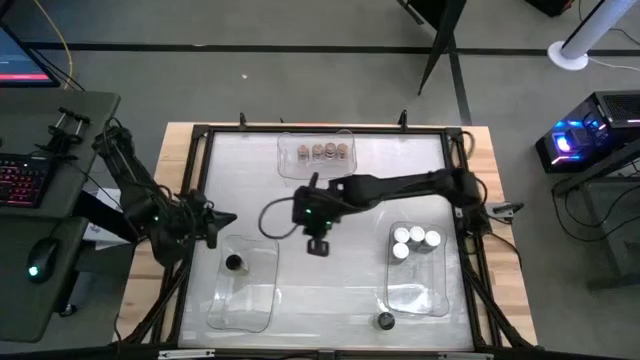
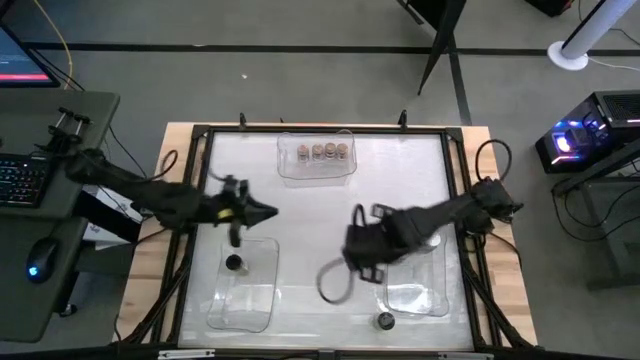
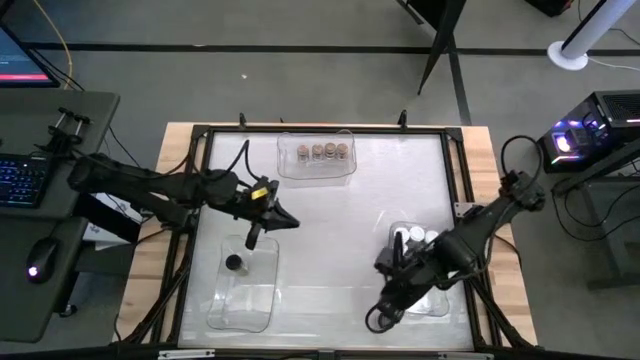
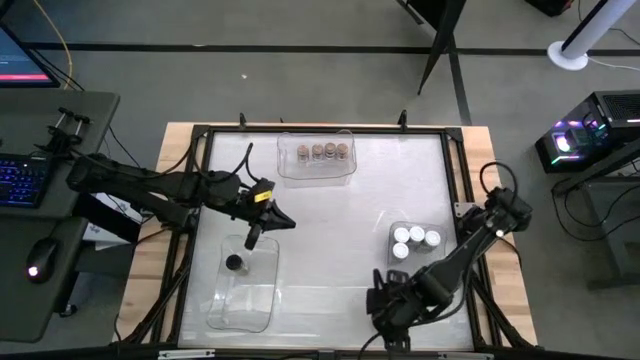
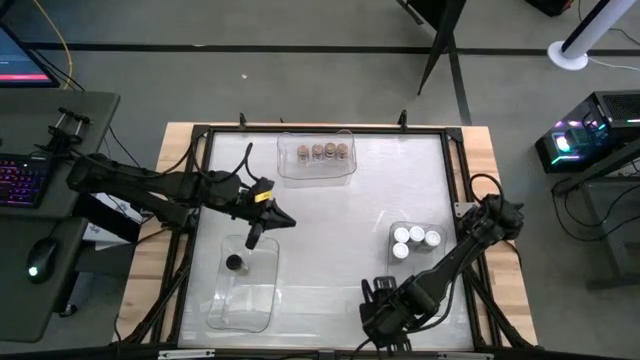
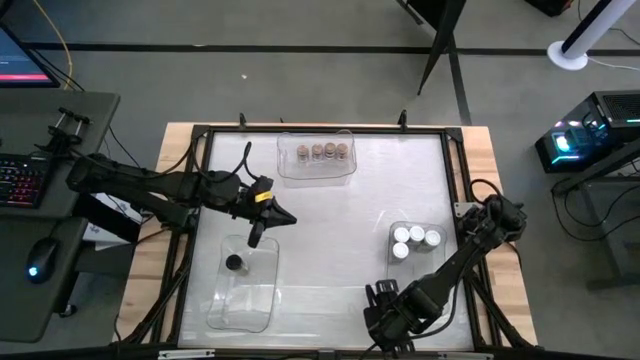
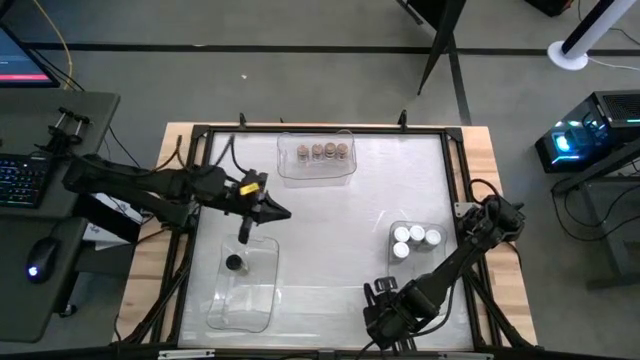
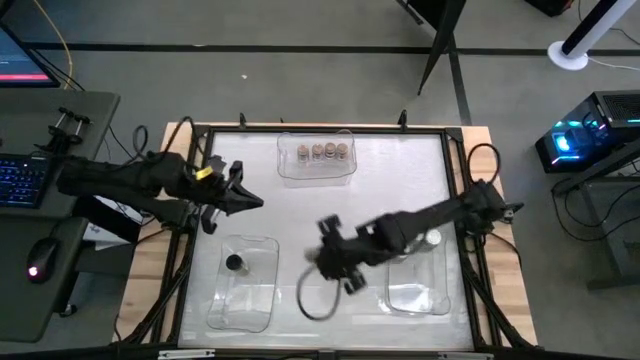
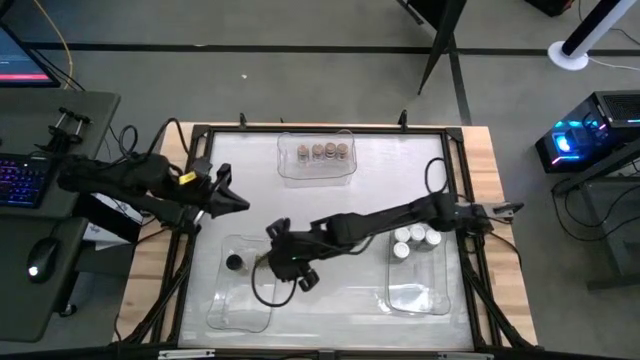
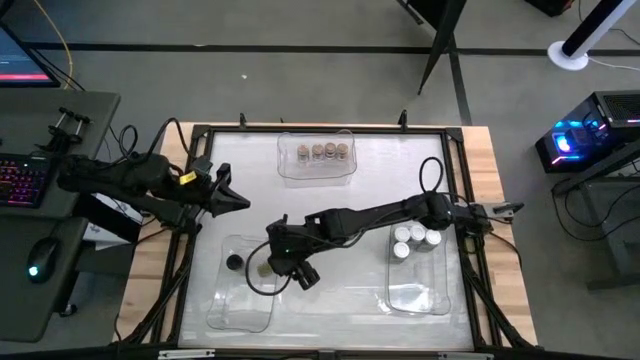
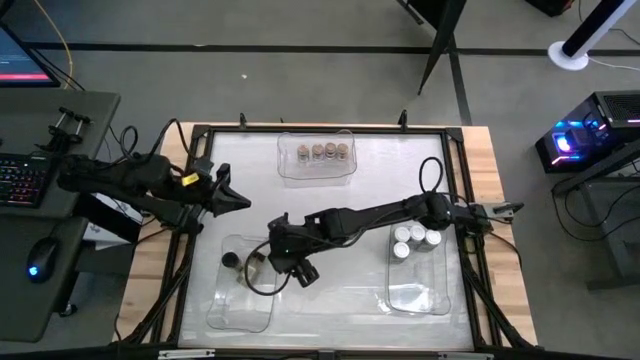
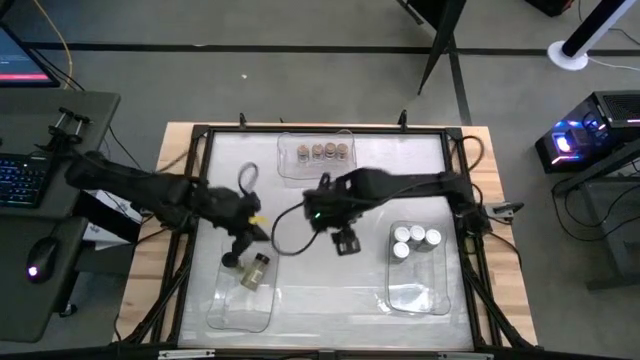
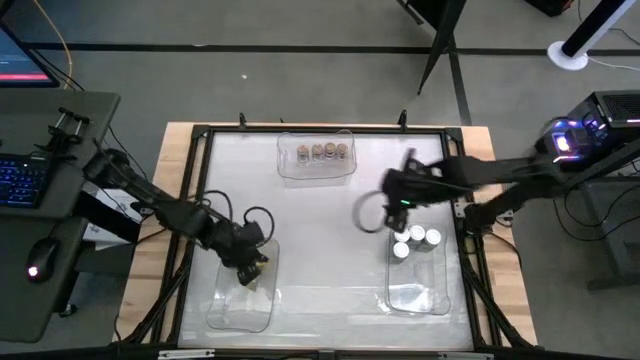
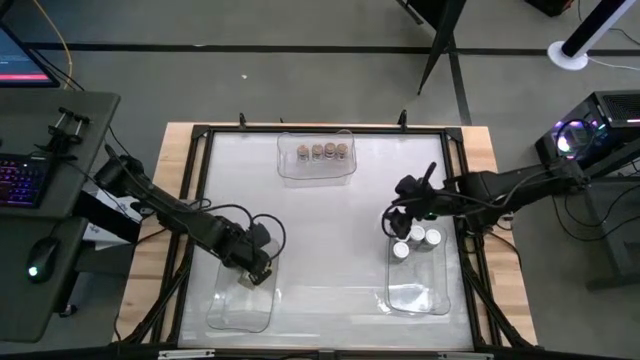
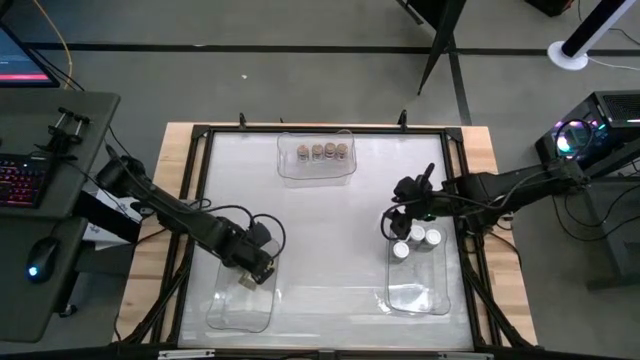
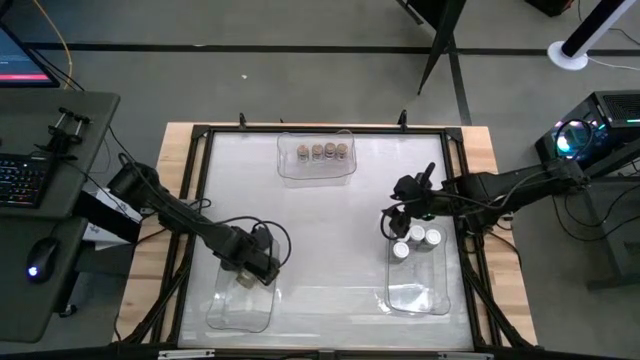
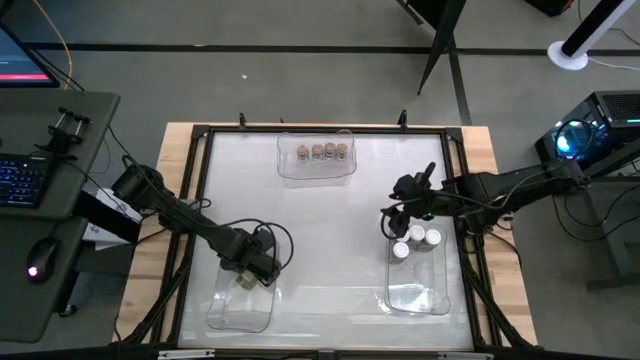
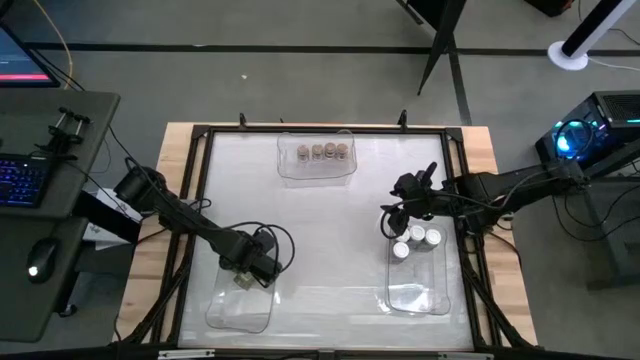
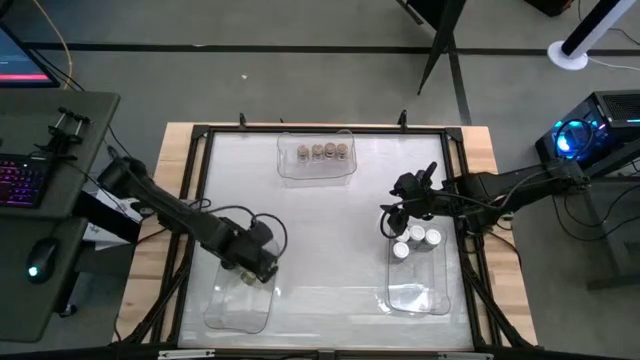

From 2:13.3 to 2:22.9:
Task: Sort spices by type
Put the green seasoning bottle into the bottom left transparent bin

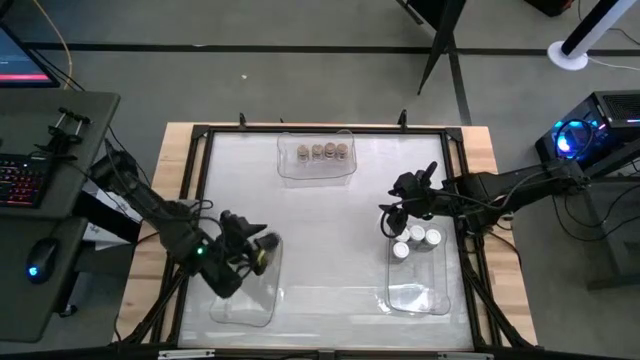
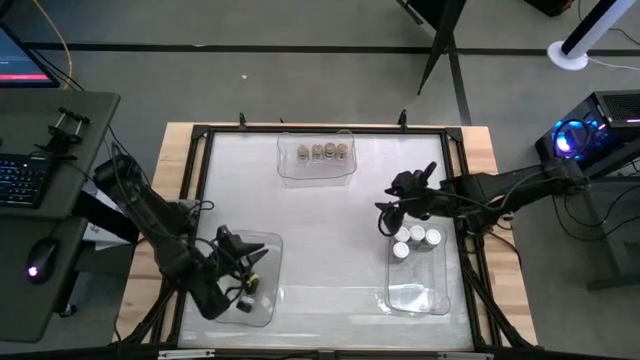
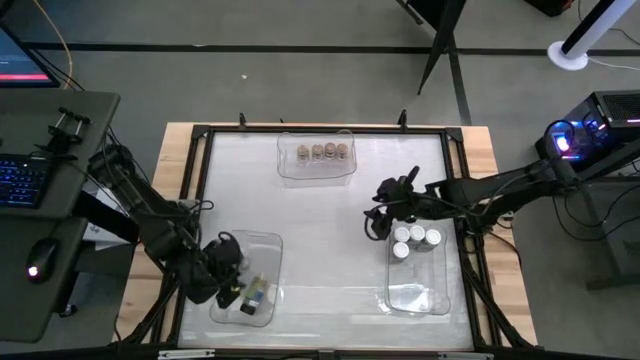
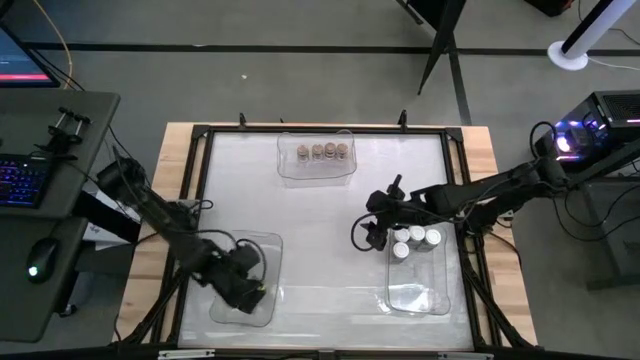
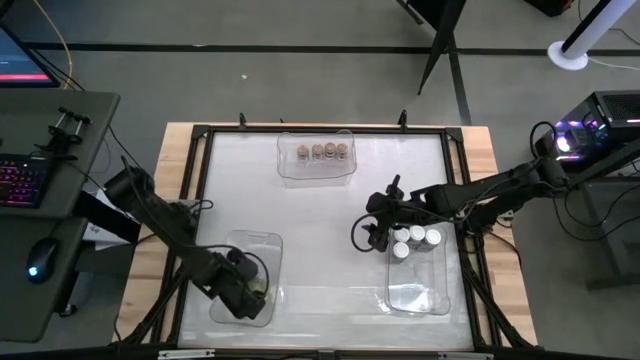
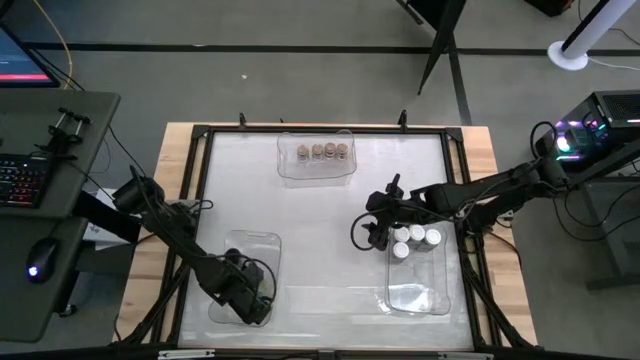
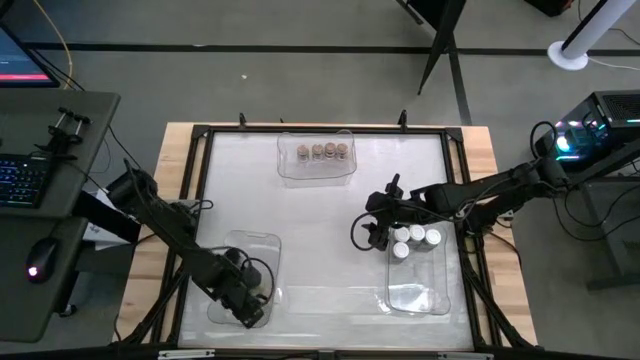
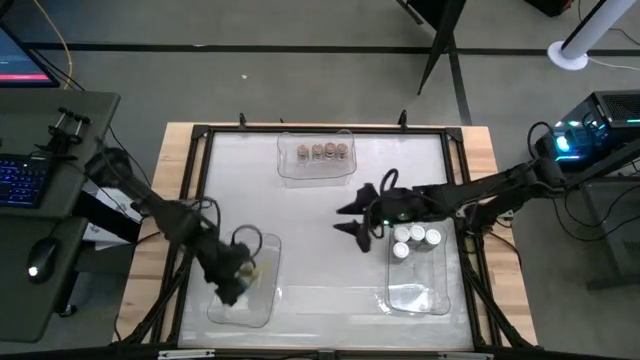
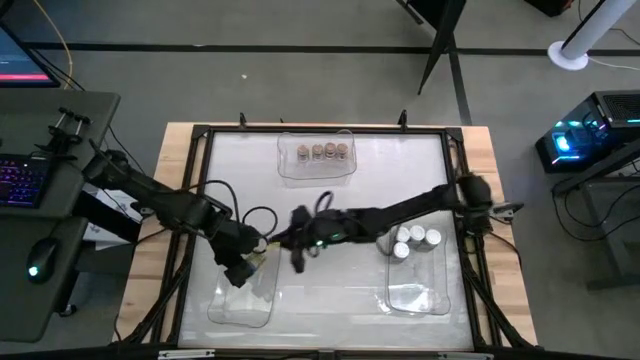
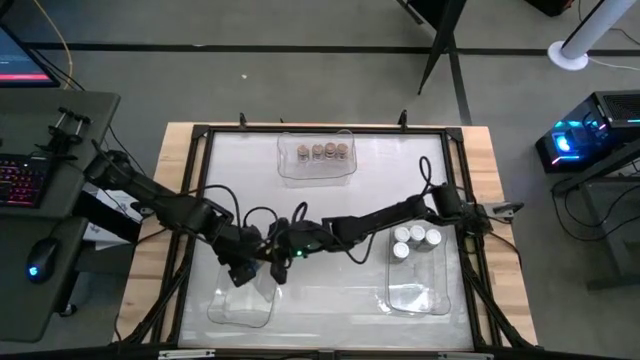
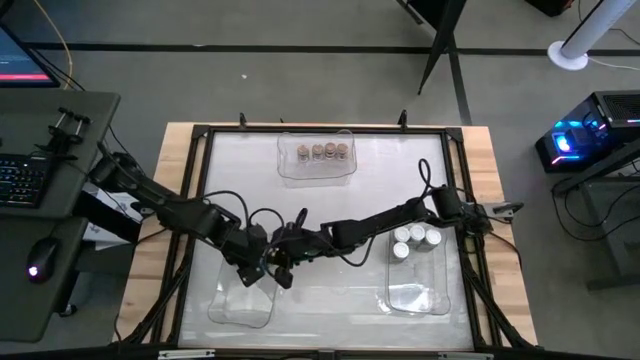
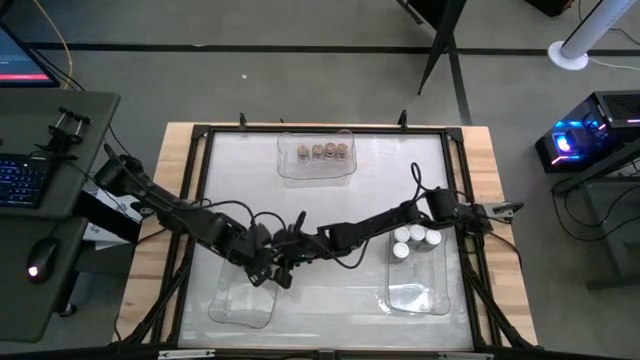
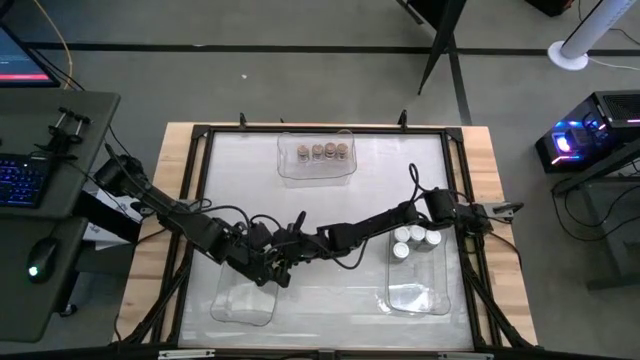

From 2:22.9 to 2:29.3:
Put the green seasoning bottle into the bottom left transparent bin

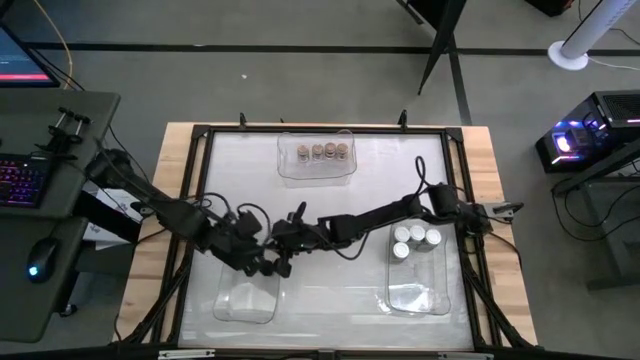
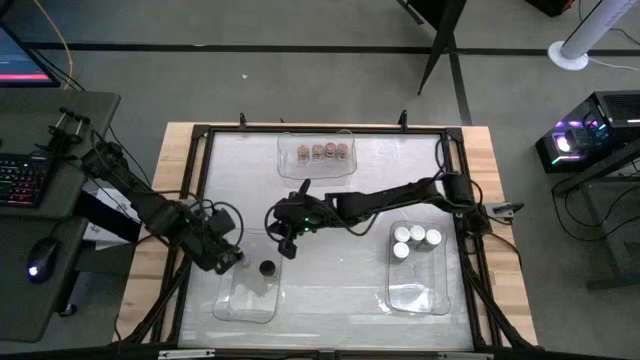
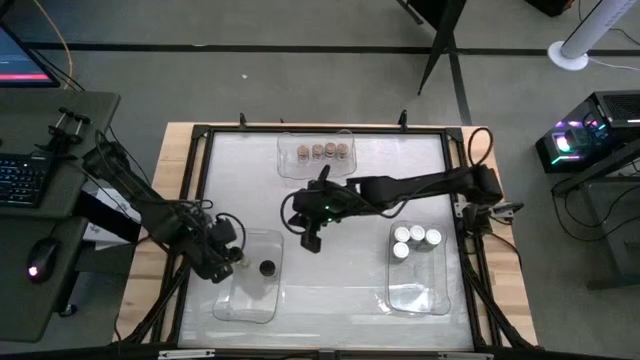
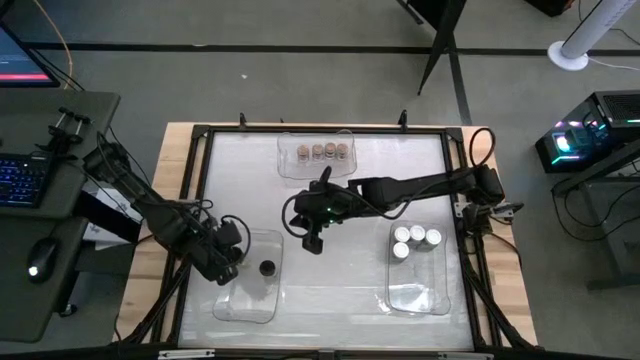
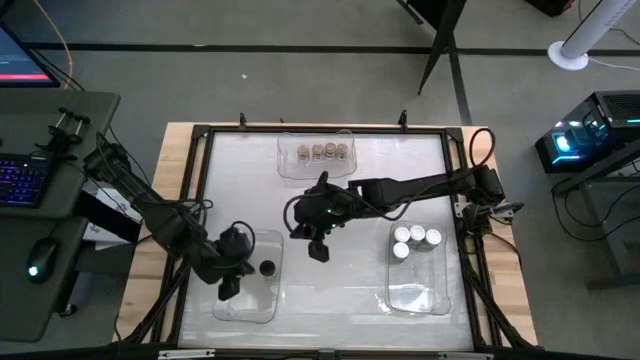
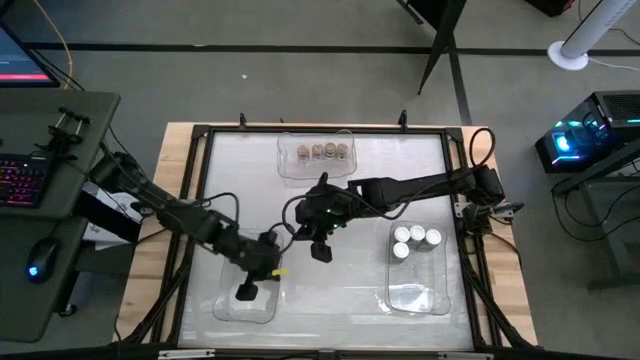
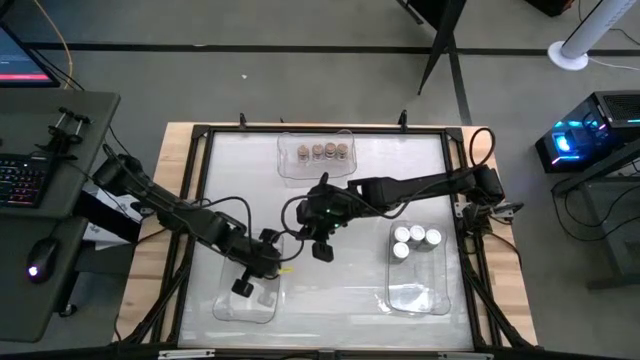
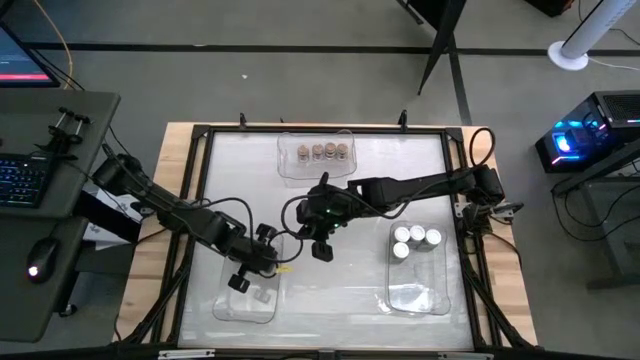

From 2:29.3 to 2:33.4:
Adjust the green seasoning bottles inside the bottom left transparent bin

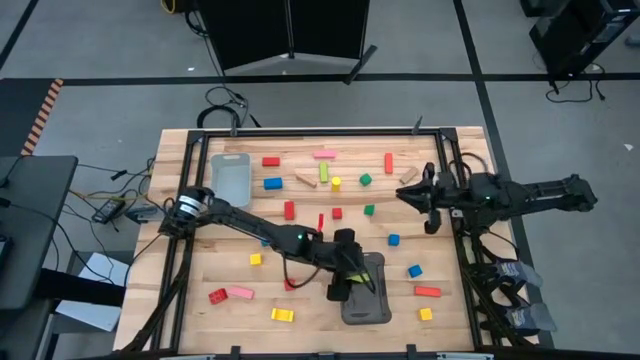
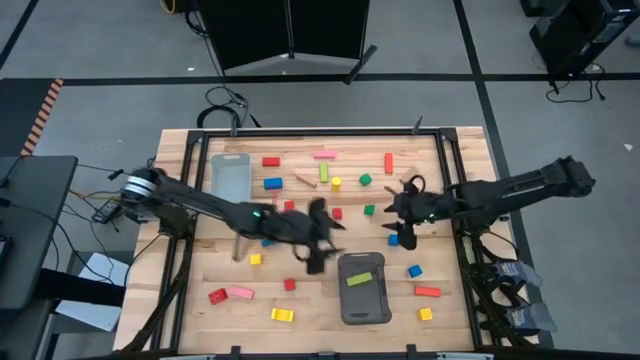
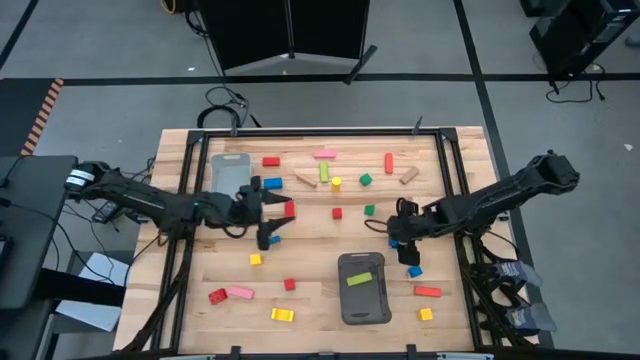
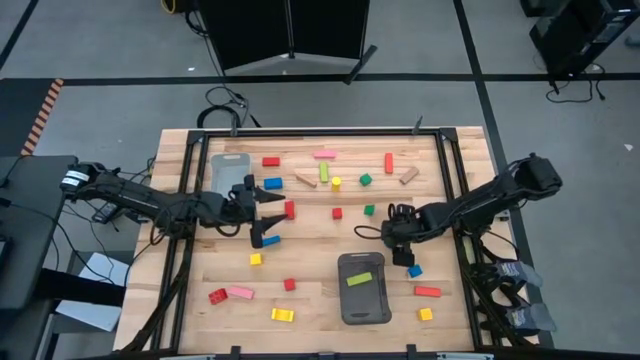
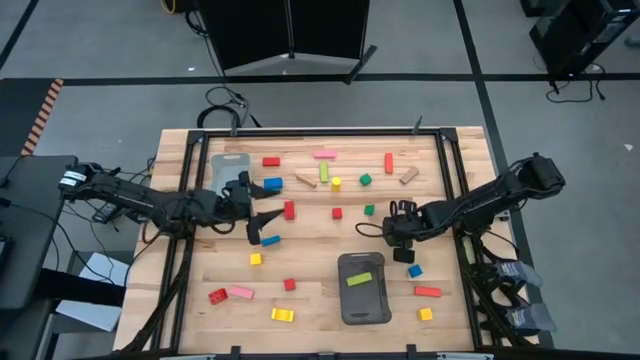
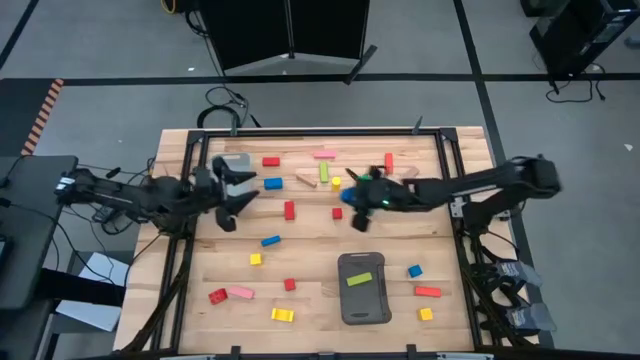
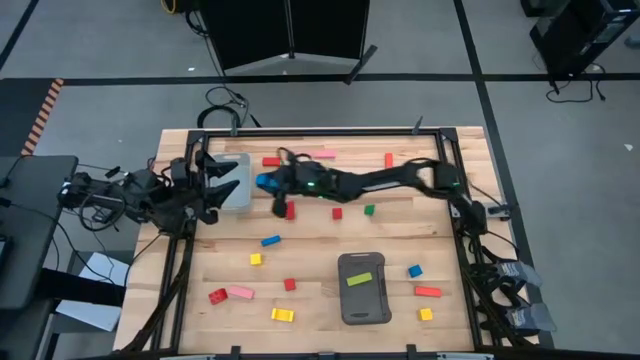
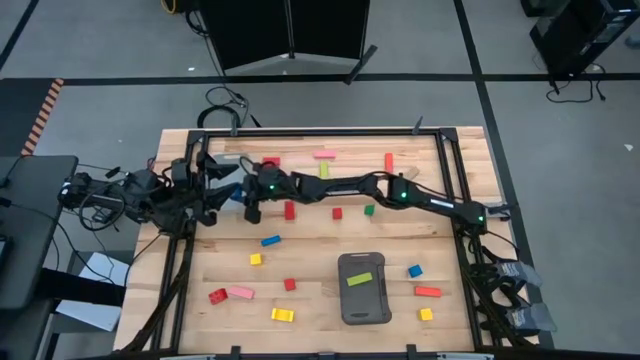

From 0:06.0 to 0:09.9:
Task: Sort blocks by size
Put the blue cube block into the gray bin
